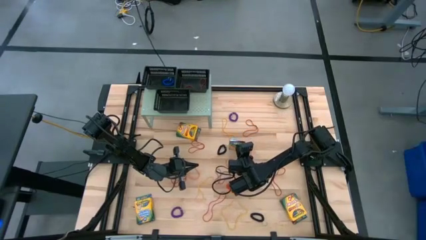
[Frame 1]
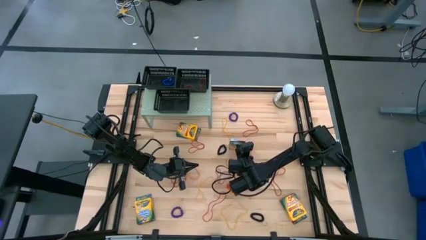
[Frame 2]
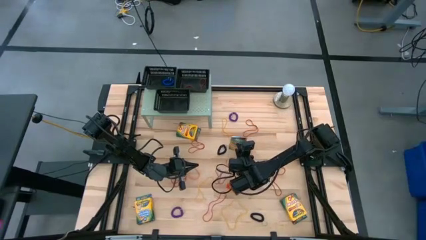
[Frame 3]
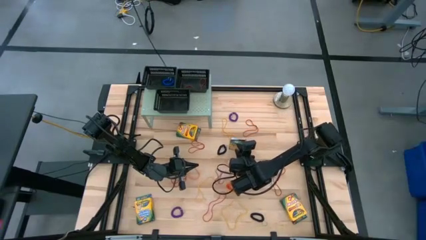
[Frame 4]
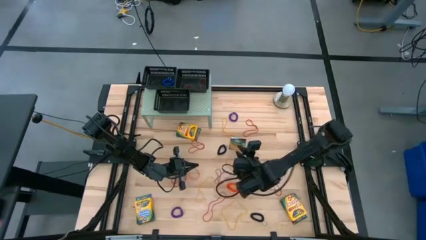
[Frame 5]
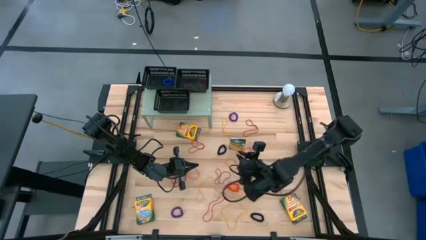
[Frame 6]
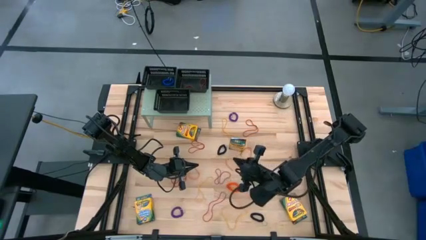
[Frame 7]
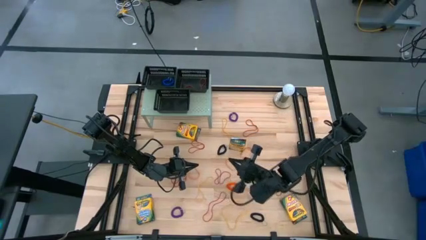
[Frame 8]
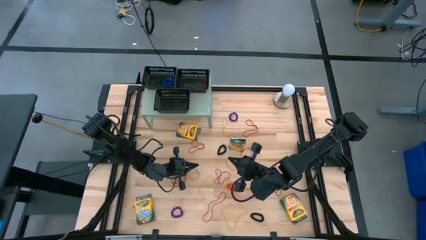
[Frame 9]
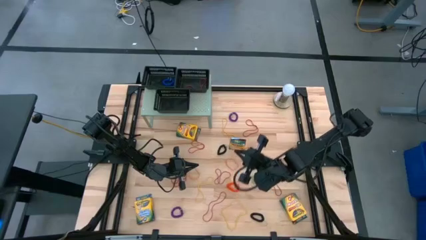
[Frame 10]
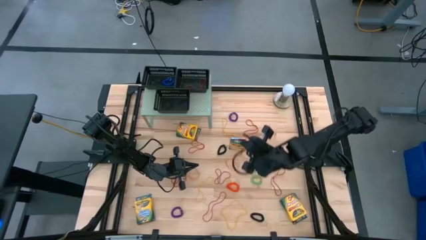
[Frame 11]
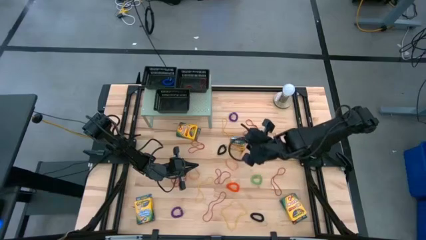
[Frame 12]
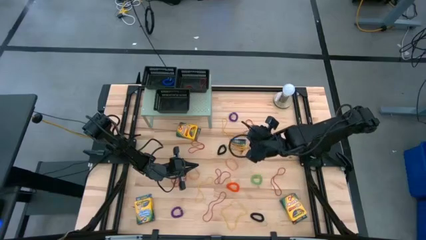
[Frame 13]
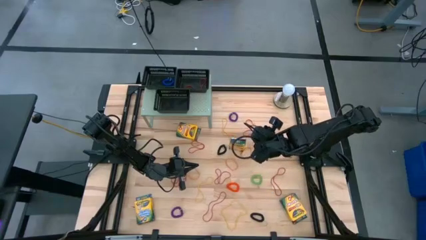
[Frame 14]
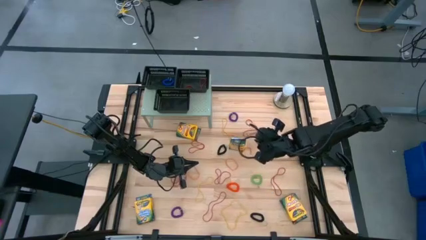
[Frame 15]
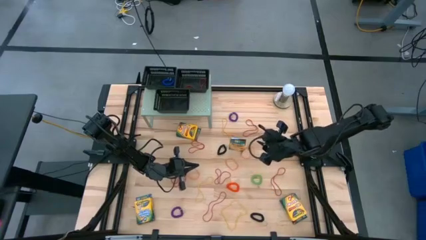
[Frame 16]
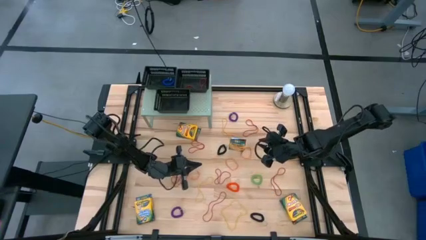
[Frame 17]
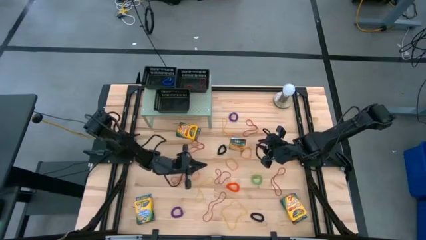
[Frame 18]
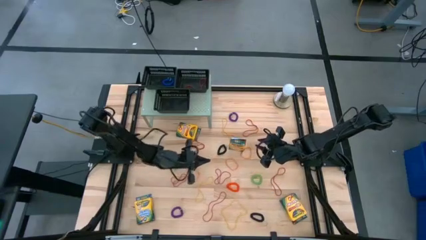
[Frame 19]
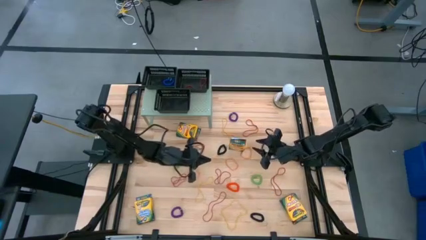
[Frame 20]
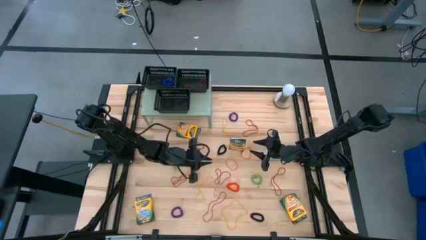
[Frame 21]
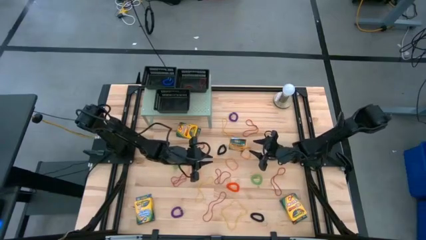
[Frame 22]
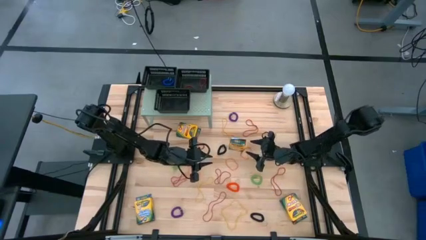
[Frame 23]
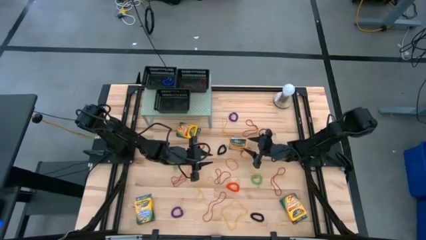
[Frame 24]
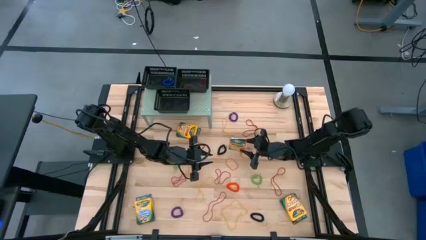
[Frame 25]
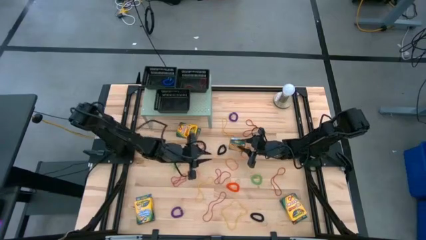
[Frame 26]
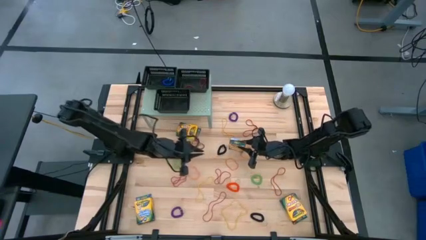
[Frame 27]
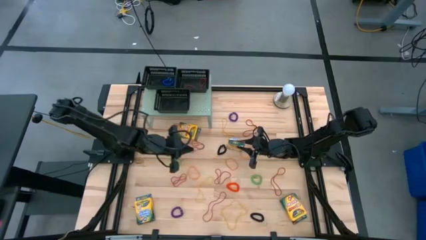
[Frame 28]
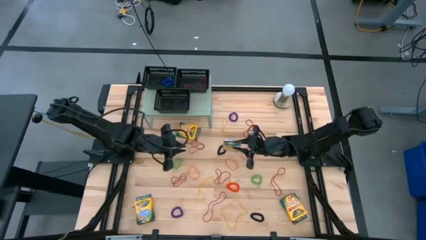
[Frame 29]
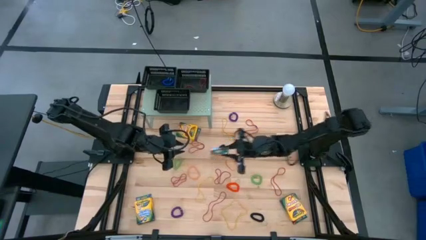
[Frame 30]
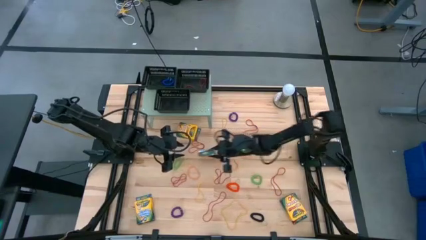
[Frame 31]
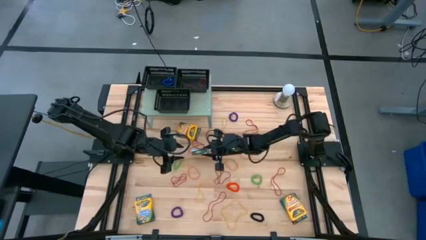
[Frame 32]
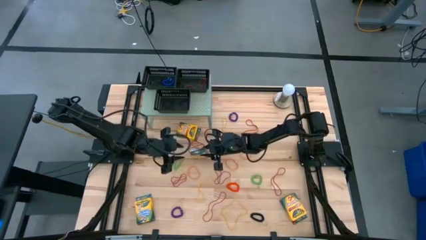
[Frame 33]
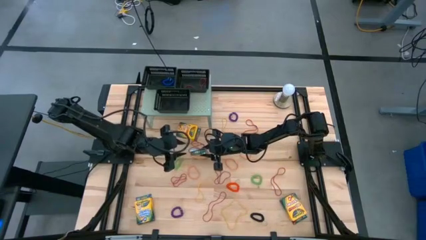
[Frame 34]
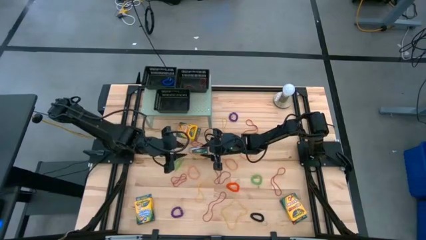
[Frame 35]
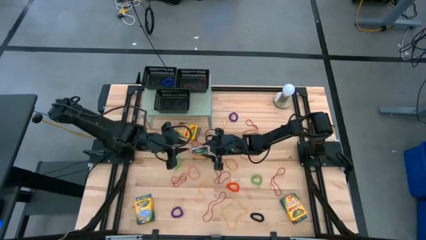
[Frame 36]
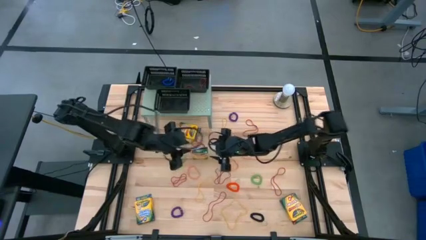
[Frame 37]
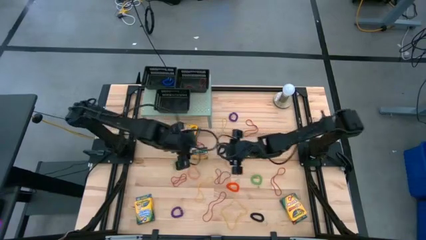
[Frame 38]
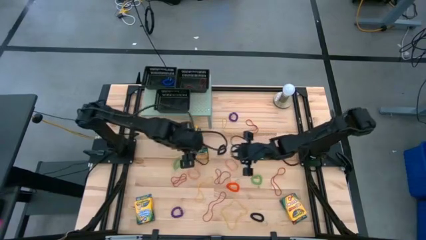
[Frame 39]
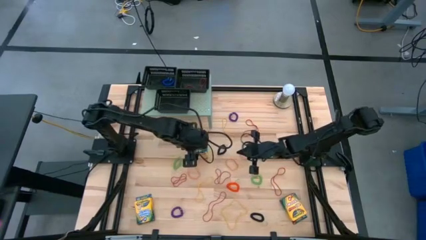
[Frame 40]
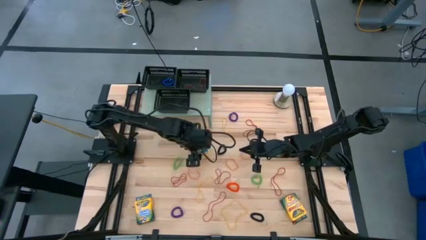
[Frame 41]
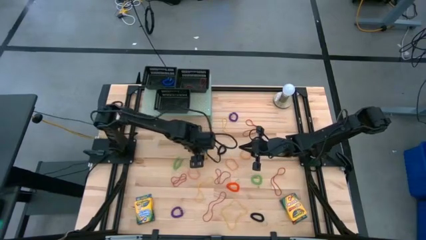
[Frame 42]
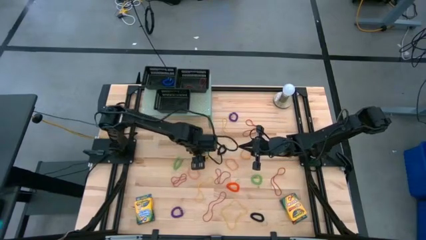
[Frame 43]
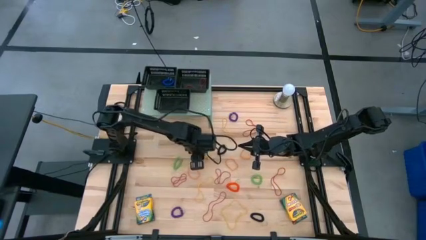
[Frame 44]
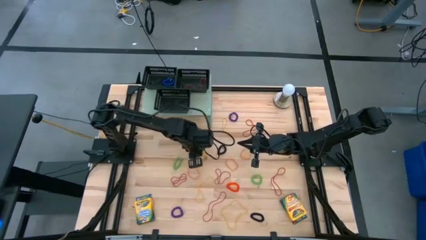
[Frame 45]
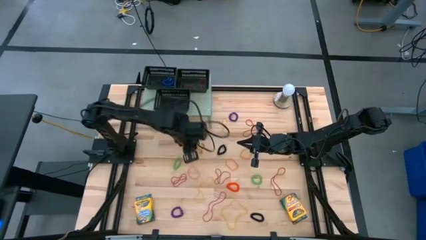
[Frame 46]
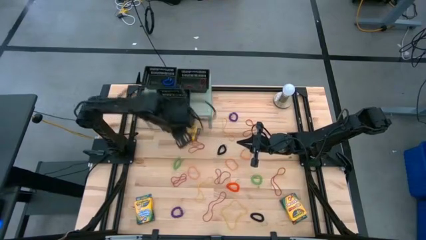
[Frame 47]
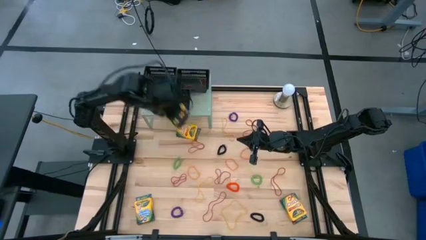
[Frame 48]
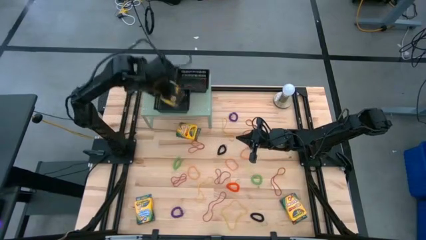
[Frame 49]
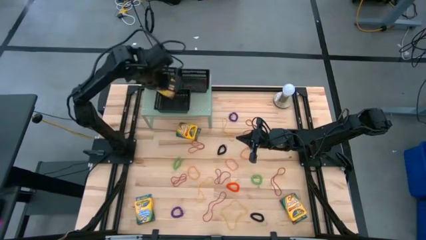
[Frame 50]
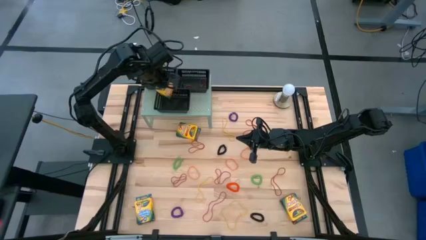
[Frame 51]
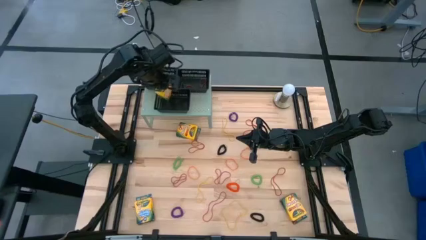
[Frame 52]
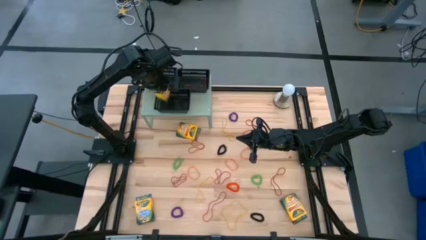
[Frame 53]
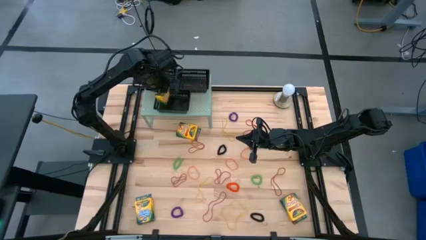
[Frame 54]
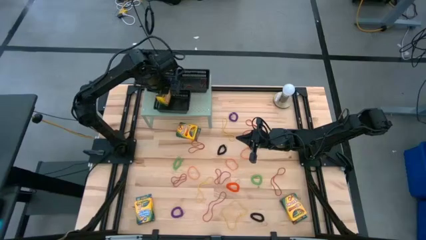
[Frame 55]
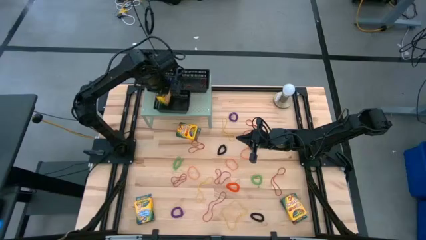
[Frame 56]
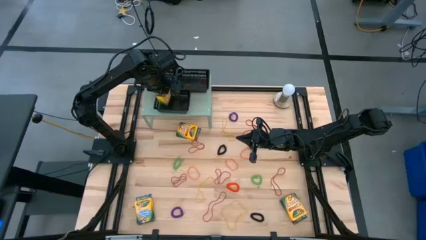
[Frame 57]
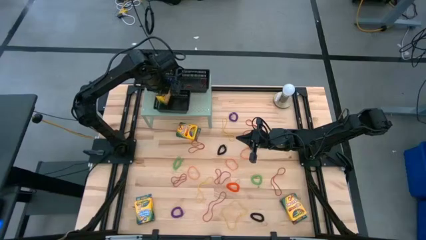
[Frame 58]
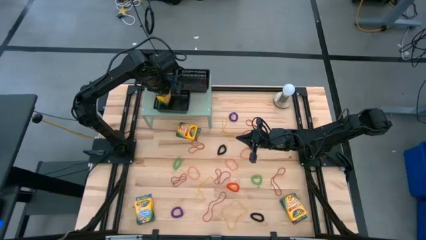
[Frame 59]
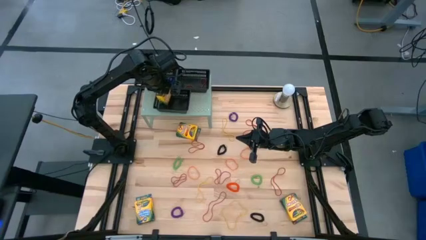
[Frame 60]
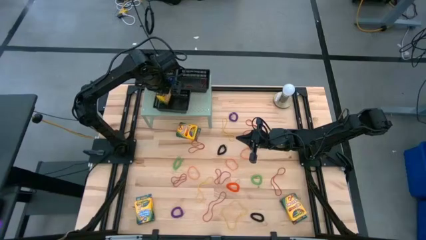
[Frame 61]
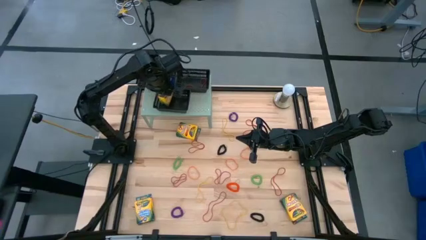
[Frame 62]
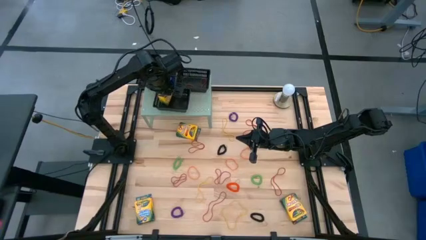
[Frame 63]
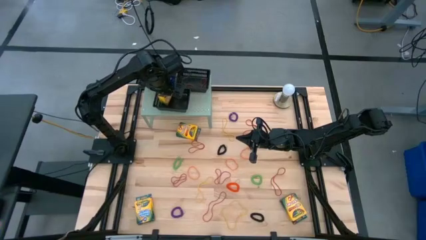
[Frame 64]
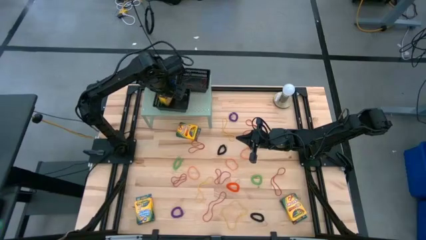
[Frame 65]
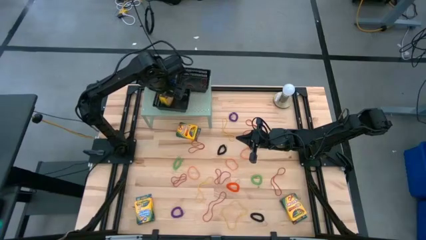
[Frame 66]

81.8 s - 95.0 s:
Task: Pick & Place Office Desk Supplies
Put the yellow crayon box into the bottom black bin

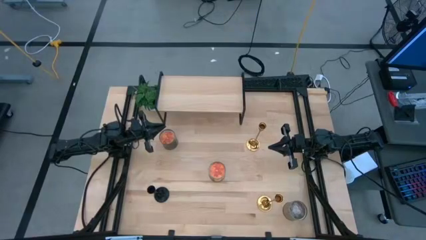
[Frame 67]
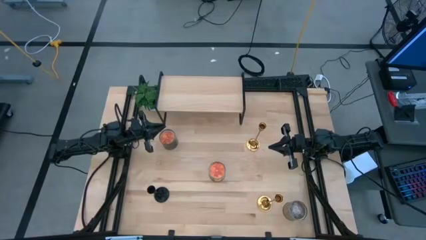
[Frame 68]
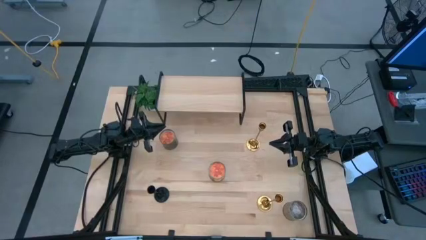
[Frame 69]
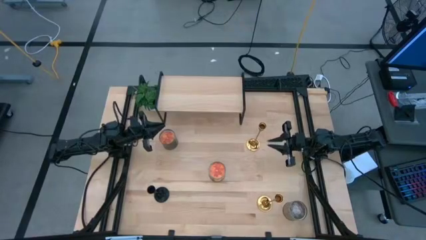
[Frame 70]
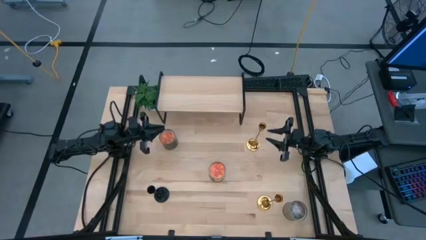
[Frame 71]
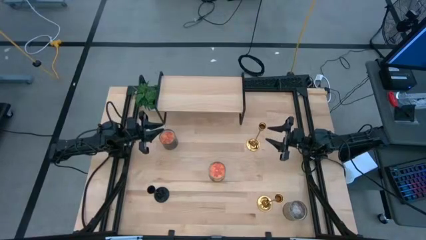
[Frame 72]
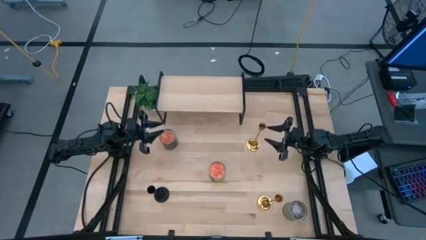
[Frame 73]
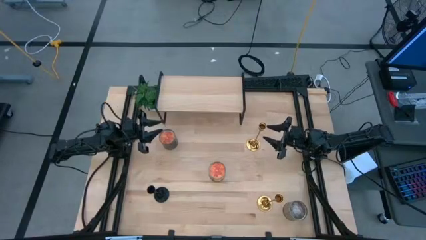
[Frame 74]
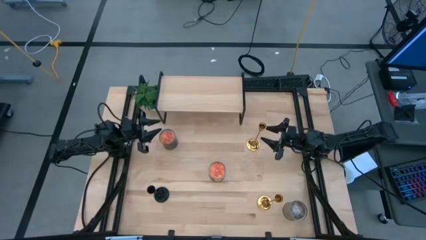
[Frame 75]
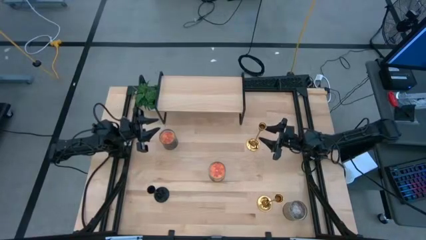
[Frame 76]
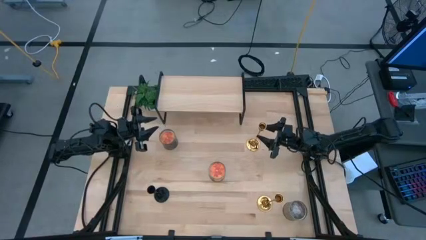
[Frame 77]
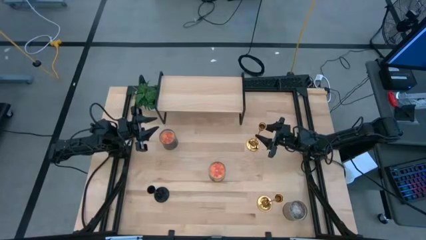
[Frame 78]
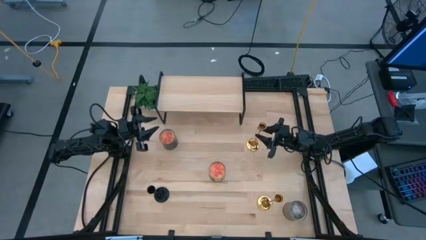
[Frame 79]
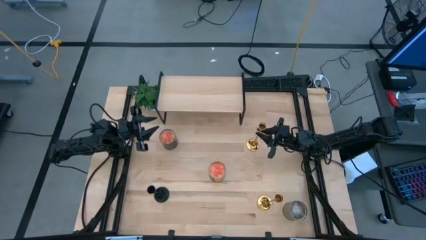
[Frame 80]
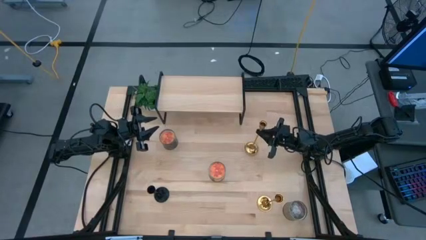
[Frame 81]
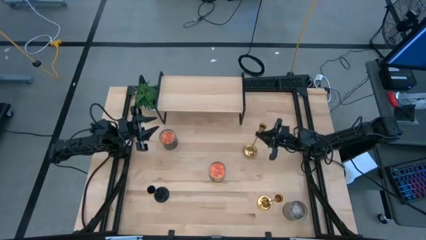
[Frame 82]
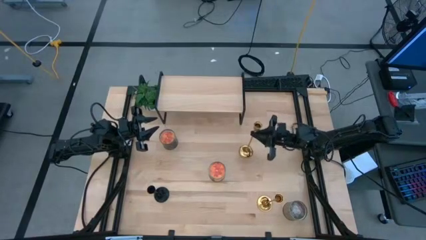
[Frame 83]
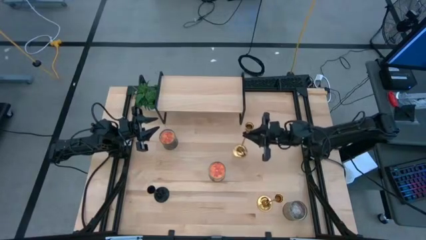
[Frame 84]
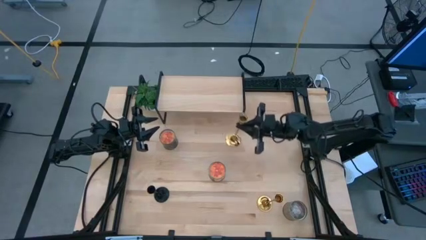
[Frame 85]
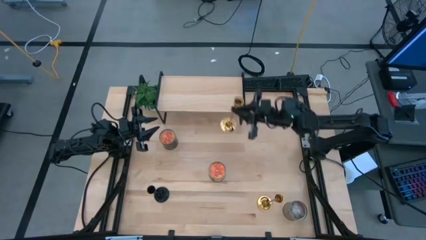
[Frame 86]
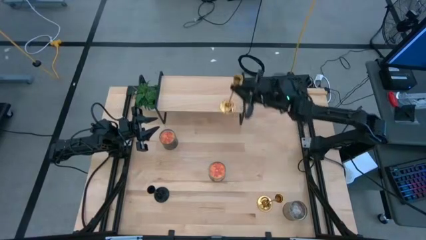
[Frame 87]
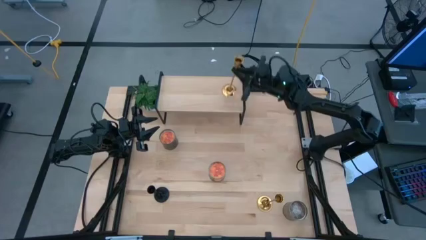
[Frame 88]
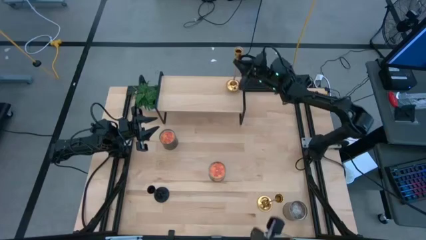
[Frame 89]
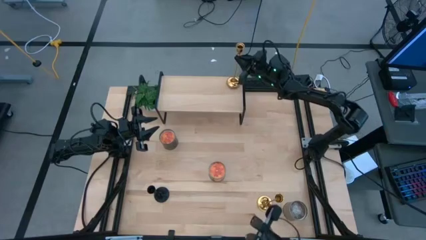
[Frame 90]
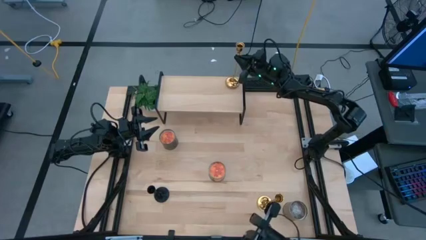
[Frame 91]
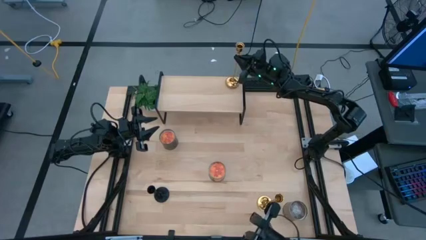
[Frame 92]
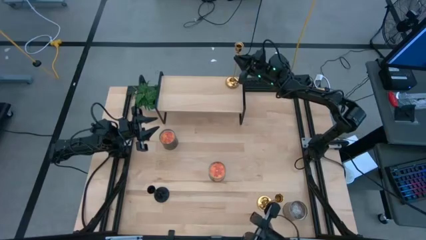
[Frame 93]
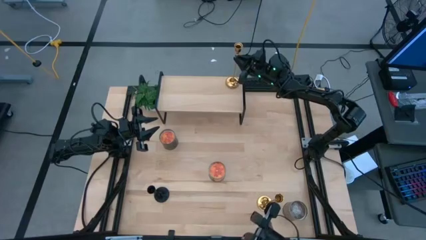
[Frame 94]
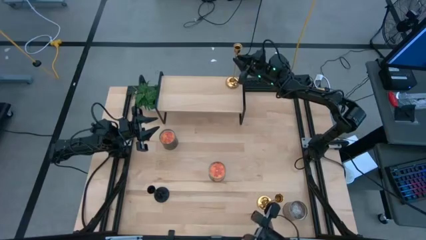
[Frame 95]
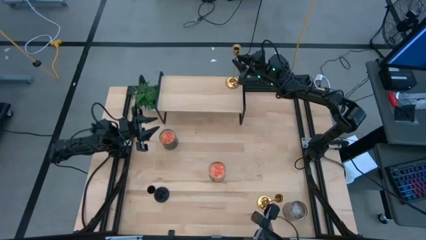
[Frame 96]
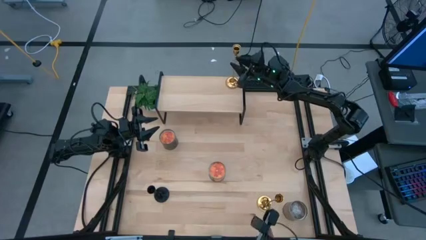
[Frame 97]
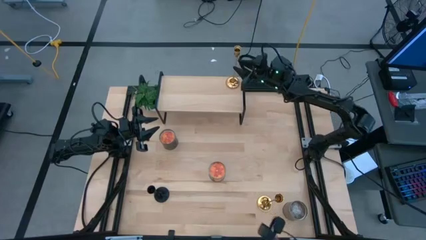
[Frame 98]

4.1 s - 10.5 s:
Task: Pick & Place candle stick holders
Put the top gold candle holder on the shelf
